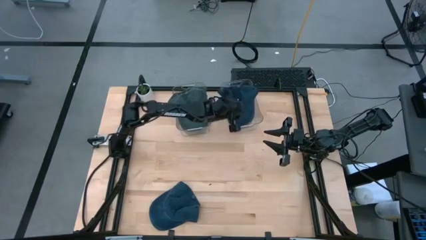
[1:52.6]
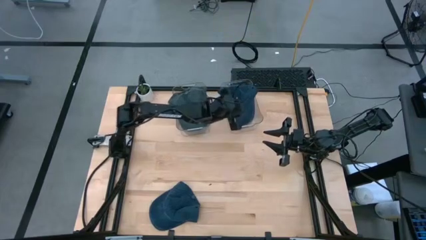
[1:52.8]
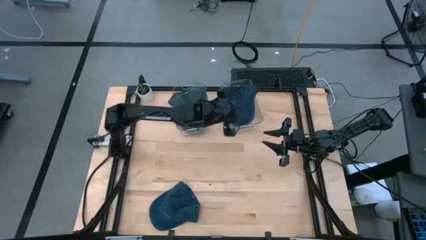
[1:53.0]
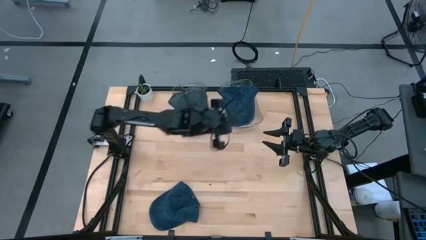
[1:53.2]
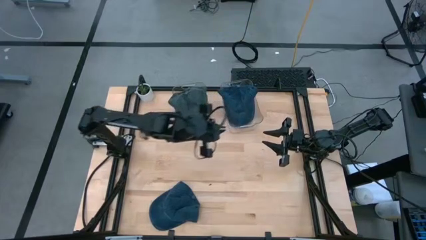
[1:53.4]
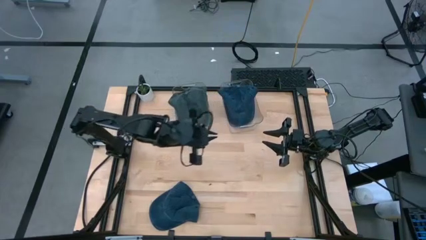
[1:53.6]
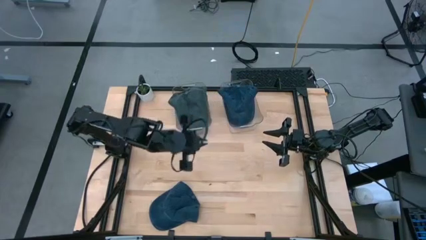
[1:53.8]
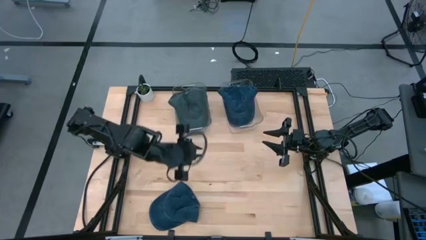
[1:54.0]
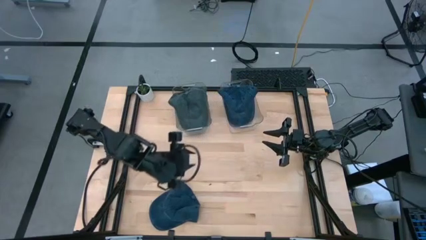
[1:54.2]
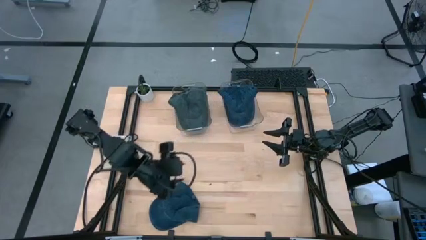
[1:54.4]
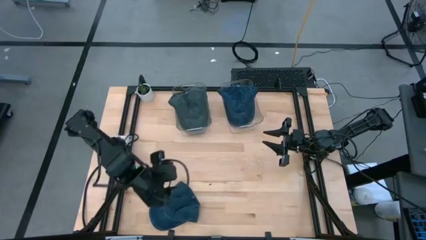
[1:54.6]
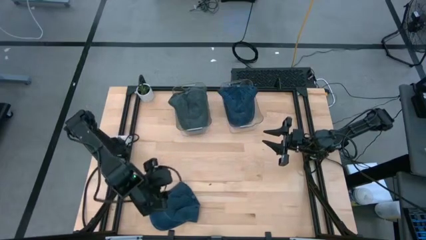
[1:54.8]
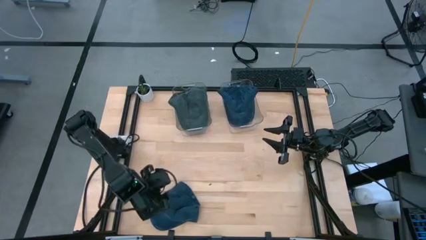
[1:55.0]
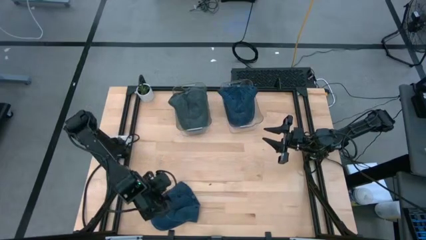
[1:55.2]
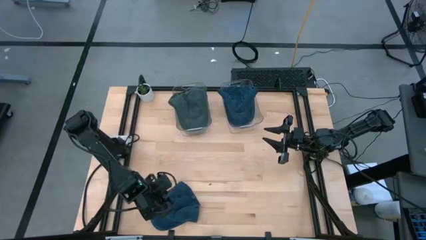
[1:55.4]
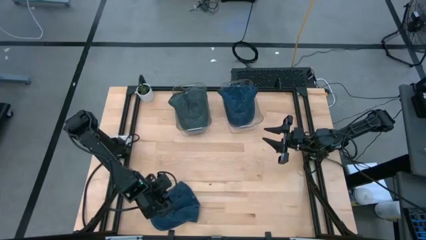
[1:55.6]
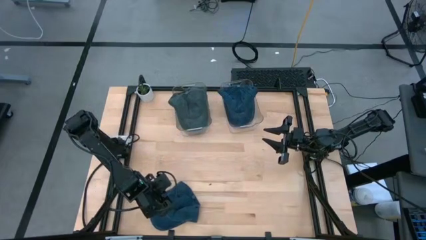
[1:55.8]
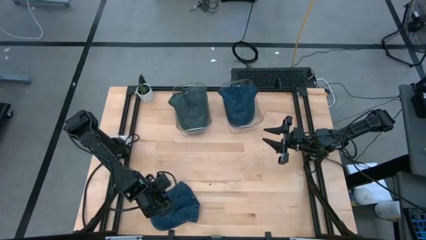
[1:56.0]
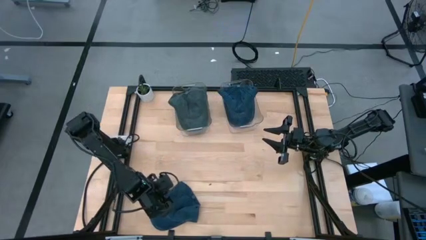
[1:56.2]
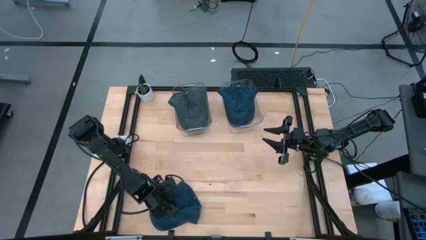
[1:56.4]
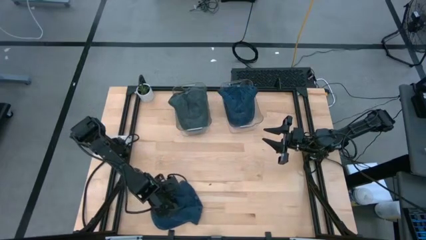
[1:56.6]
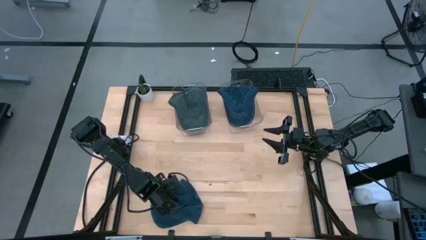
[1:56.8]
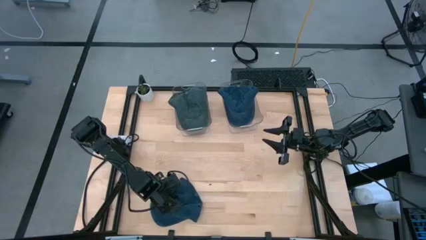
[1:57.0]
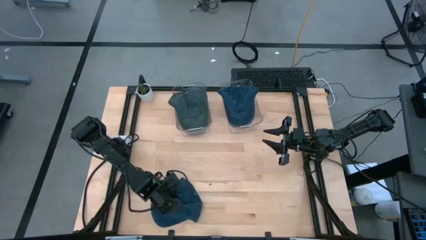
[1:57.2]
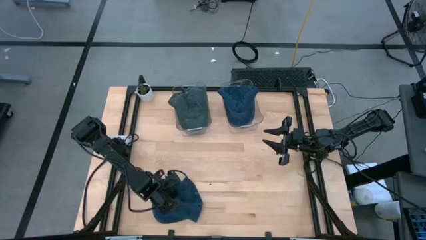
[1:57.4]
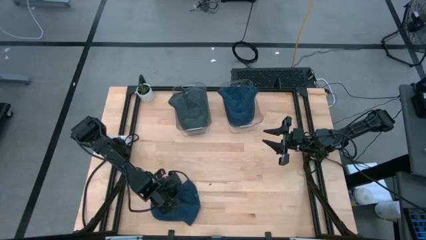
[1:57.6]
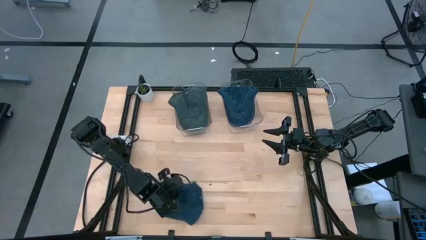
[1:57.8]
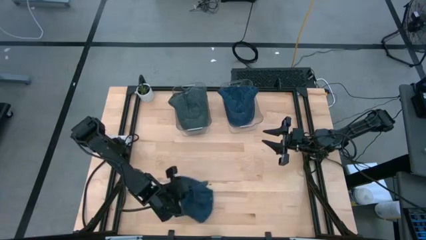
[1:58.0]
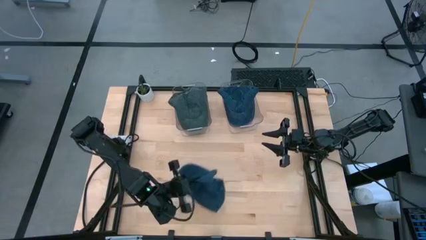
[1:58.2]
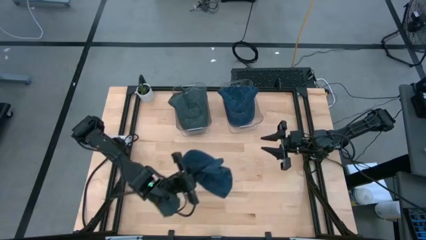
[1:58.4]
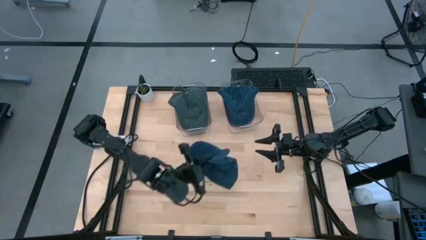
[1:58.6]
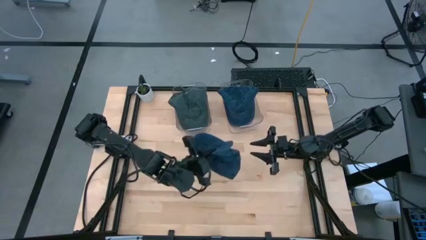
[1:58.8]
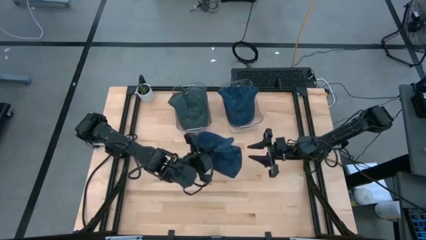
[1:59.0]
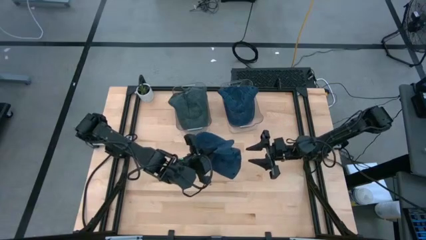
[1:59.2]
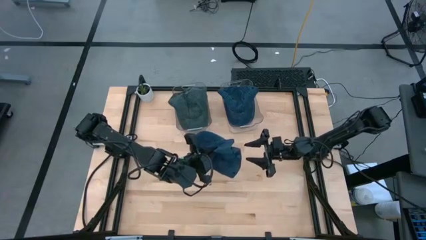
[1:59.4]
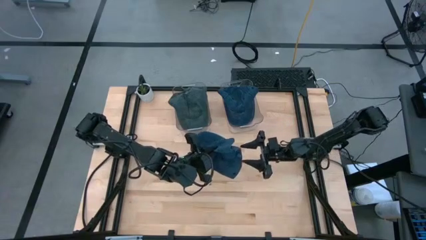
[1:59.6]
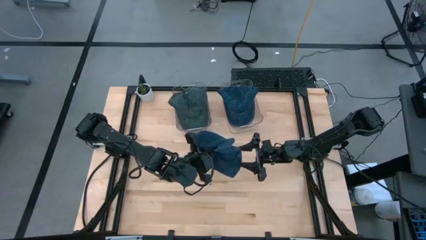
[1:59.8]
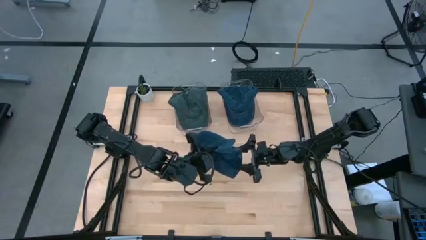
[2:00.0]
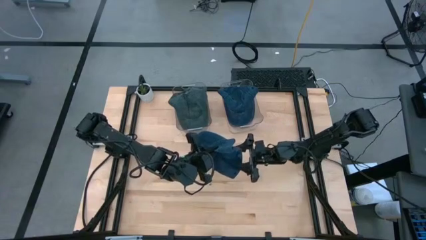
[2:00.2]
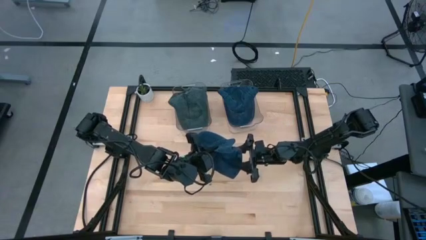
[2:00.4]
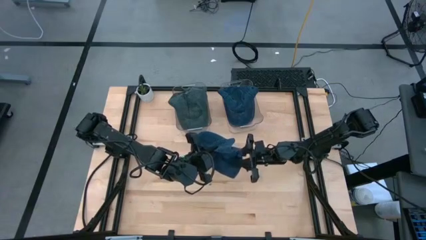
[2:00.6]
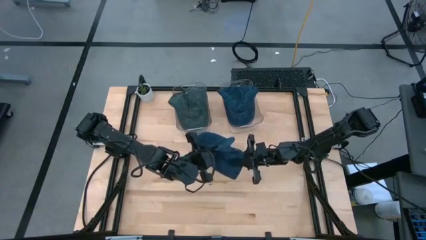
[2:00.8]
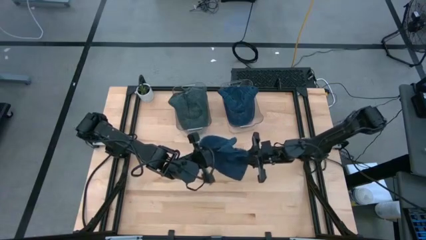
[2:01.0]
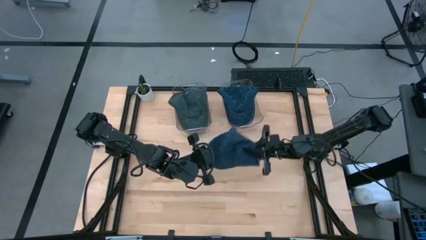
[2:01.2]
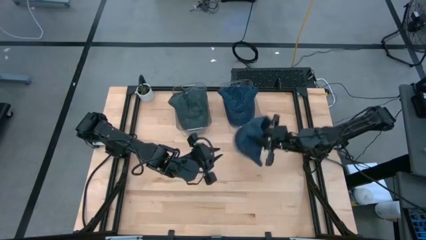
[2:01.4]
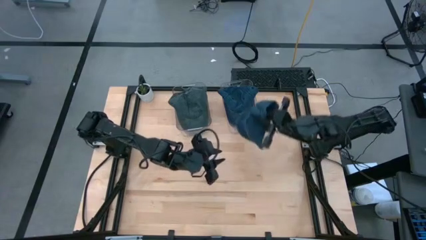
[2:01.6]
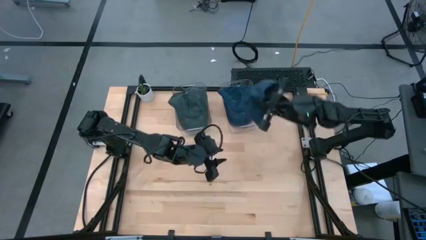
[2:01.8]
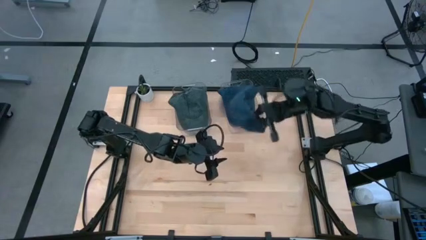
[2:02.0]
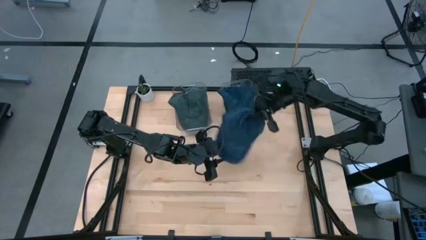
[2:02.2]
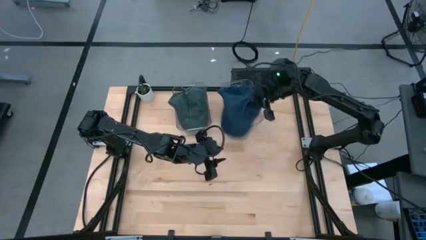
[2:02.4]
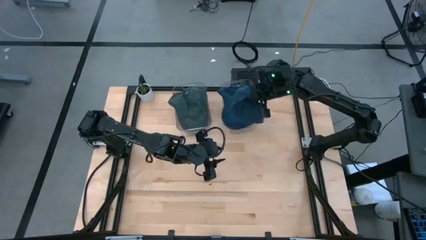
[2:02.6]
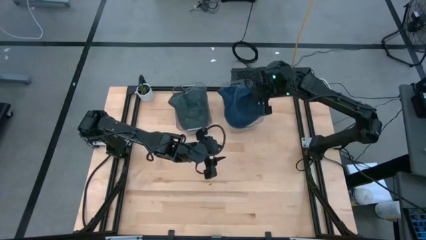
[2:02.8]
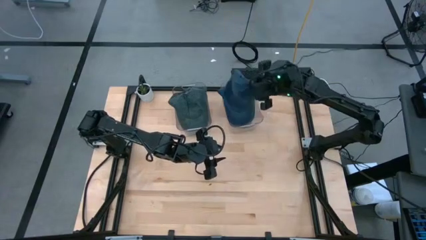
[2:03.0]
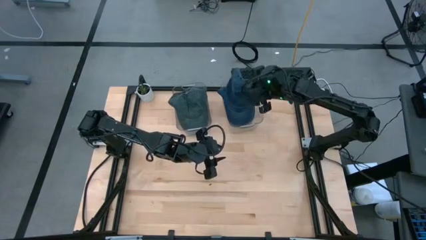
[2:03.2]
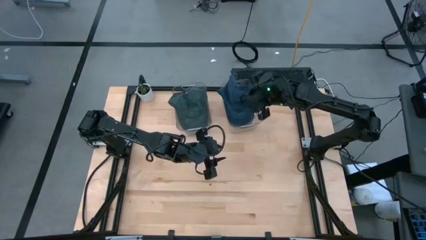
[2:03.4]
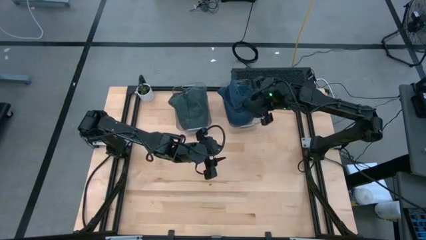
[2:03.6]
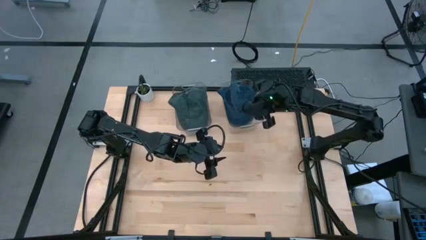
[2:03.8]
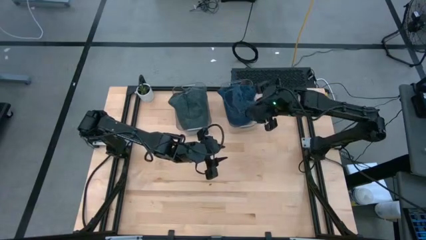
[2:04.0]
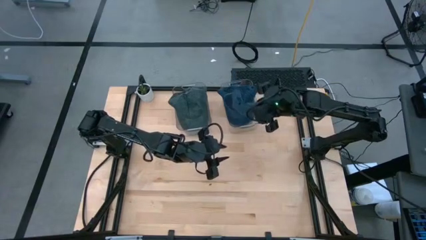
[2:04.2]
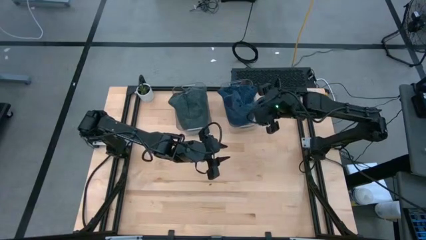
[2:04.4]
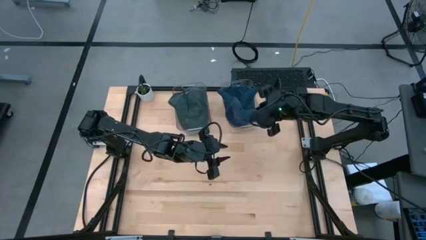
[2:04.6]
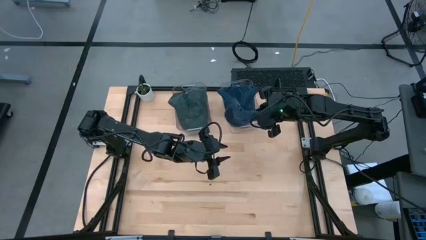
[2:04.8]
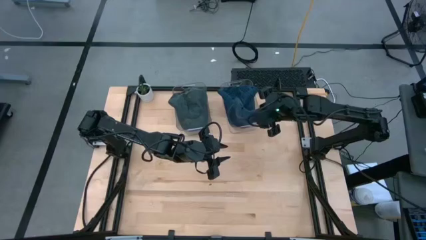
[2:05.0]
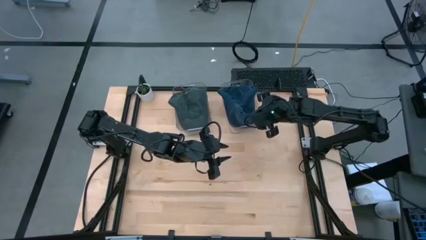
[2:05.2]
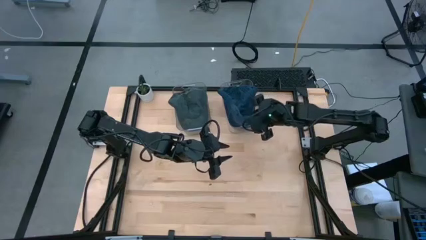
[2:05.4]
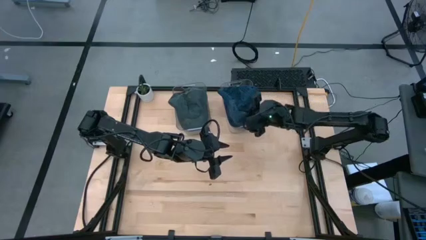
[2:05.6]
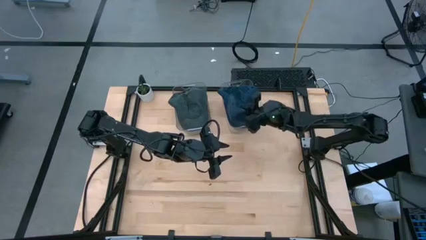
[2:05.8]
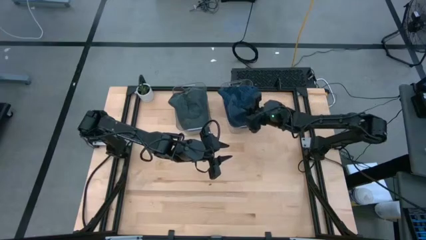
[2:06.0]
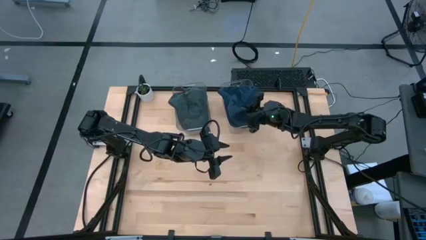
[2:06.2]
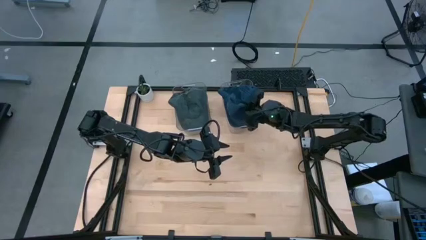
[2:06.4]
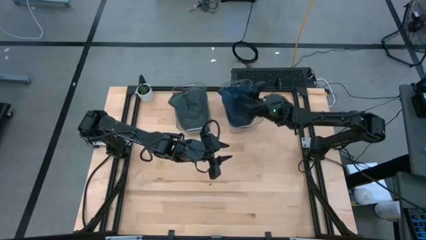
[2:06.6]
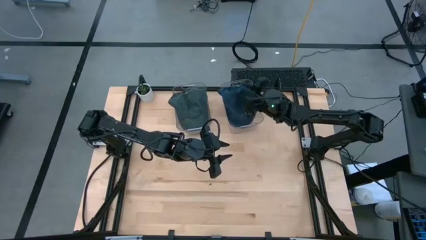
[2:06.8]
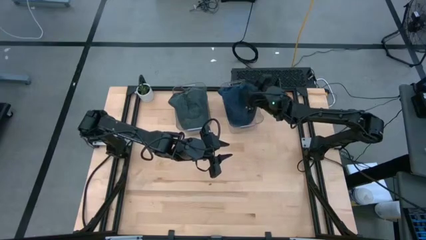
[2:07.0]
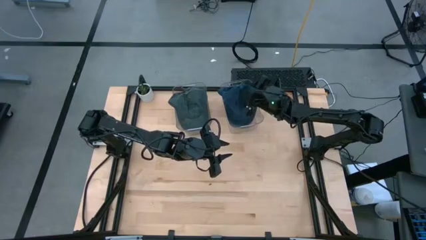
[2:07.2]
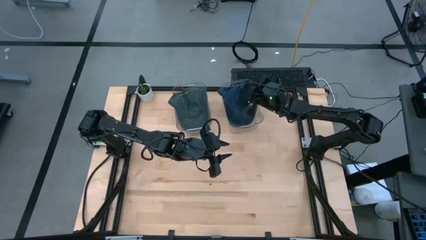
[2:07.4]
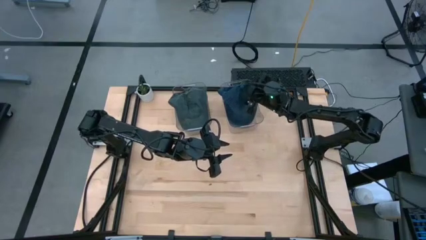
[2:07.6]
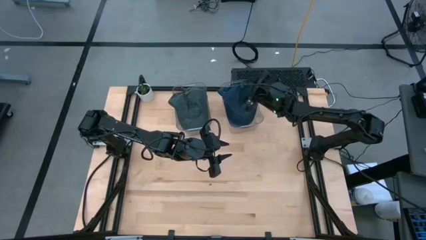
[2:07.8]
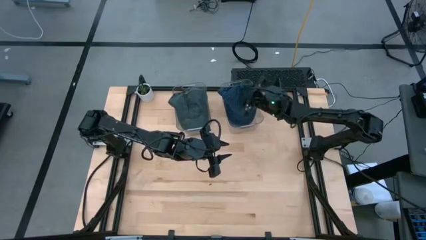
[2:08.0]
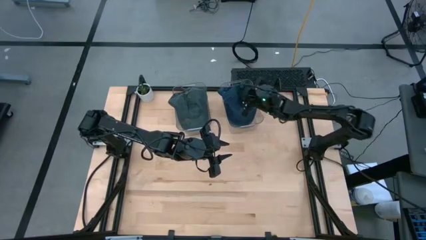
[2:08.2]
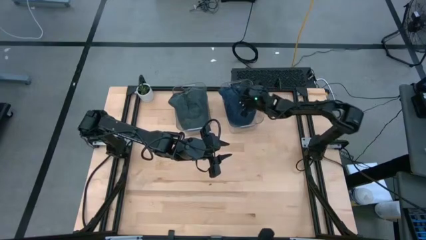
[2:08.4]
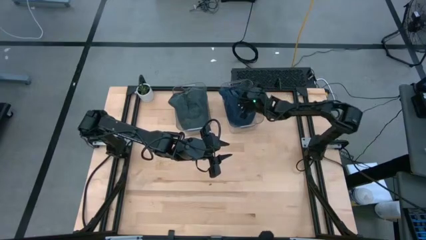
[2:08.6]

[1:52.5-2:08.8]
Task: Pick & Place hat
Put the blue cap into the right transparent bin
